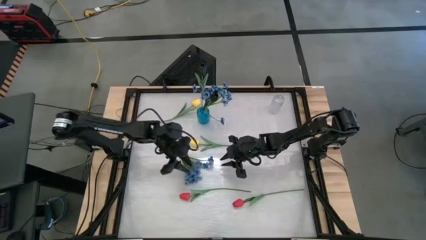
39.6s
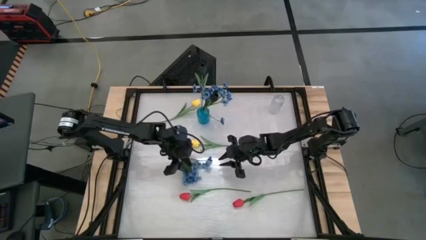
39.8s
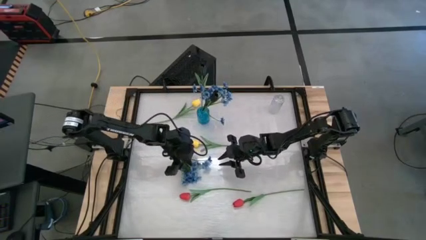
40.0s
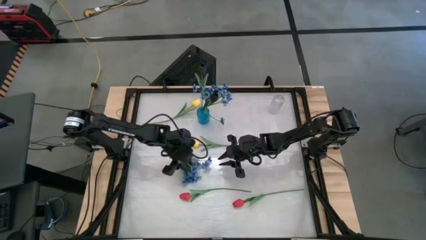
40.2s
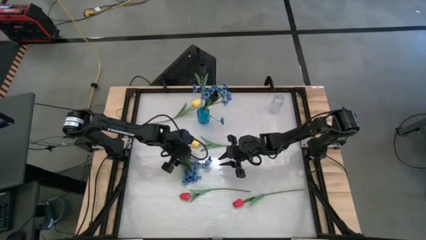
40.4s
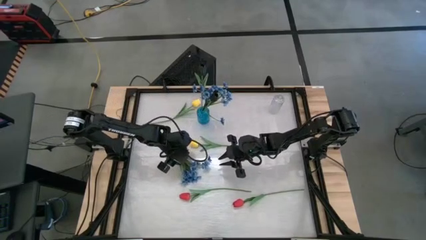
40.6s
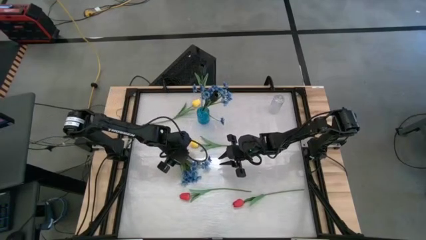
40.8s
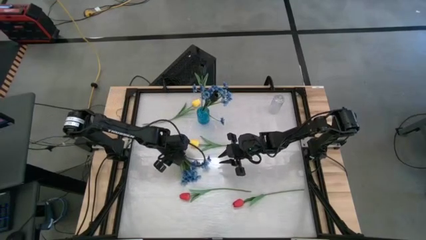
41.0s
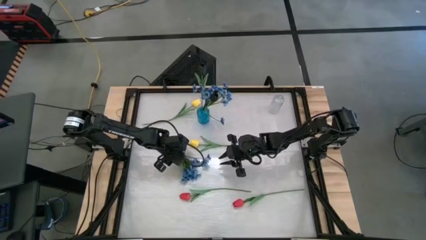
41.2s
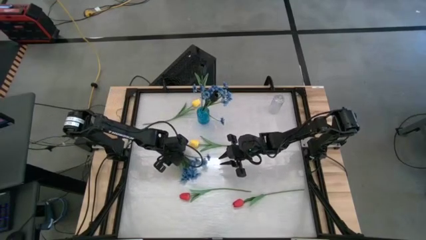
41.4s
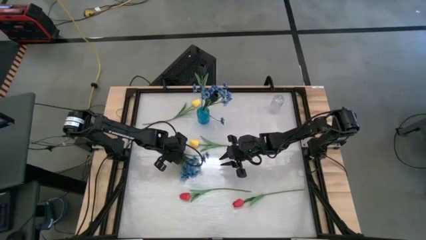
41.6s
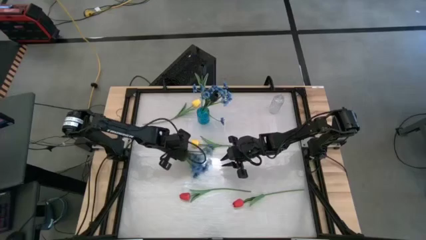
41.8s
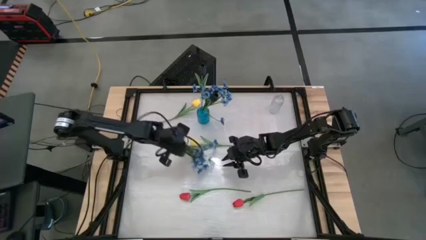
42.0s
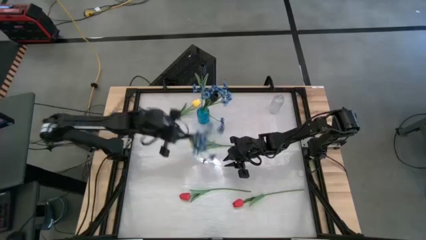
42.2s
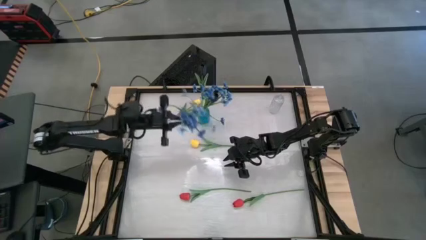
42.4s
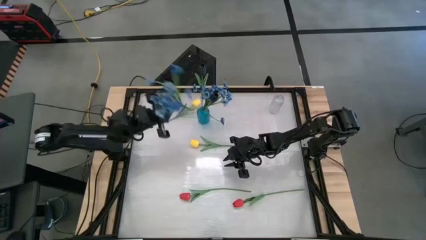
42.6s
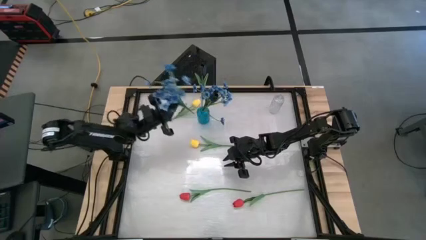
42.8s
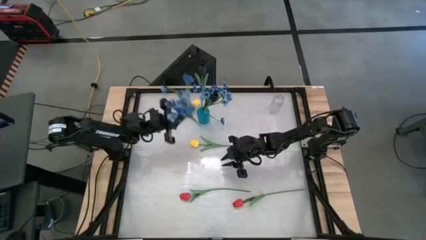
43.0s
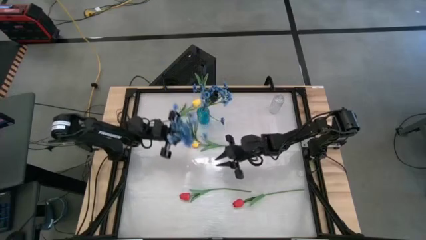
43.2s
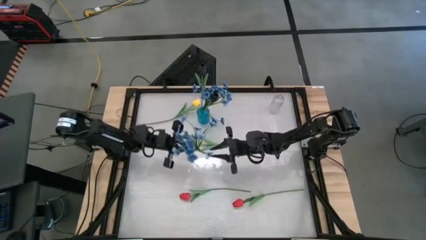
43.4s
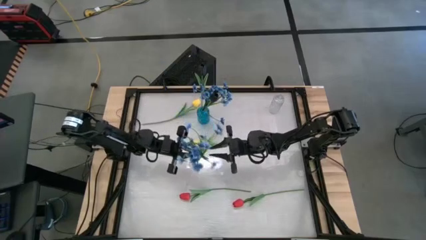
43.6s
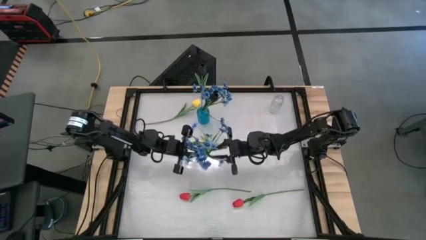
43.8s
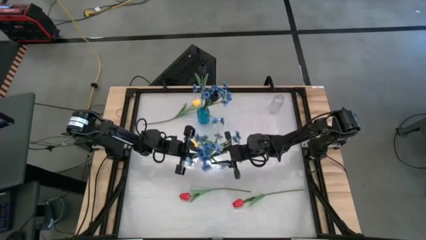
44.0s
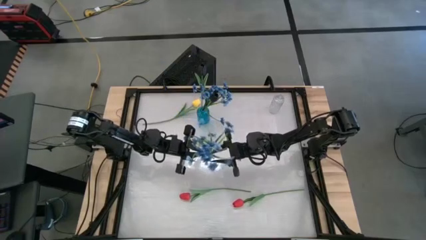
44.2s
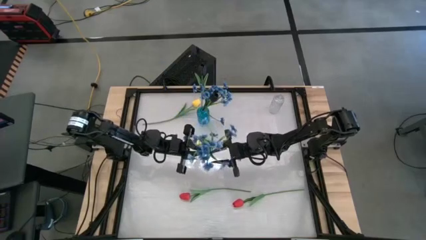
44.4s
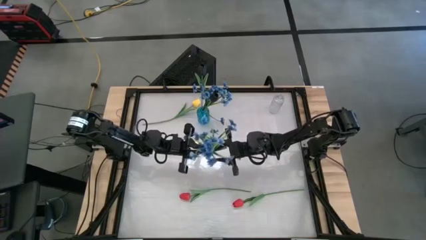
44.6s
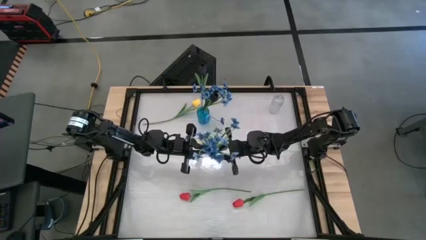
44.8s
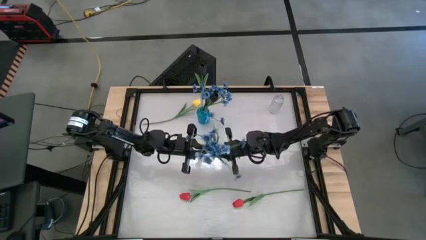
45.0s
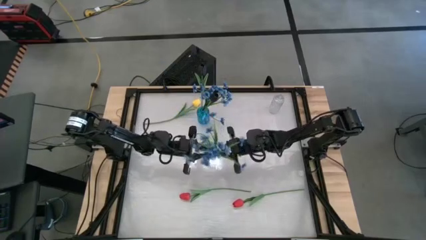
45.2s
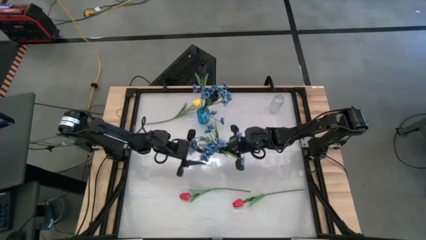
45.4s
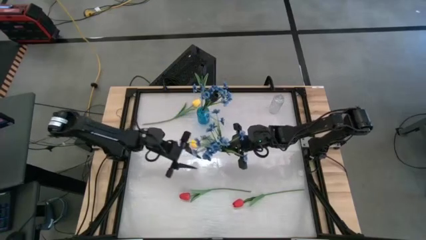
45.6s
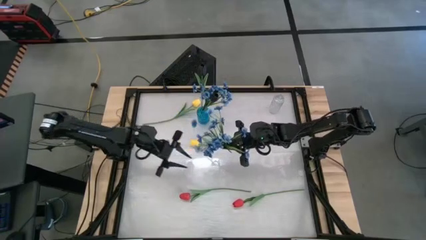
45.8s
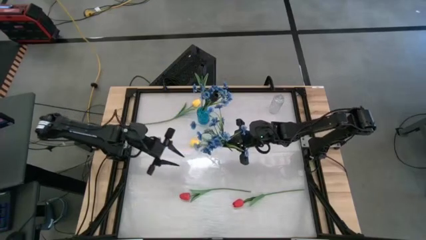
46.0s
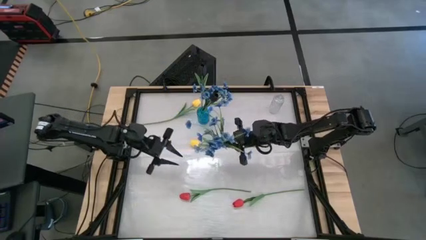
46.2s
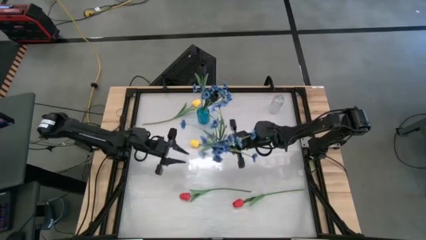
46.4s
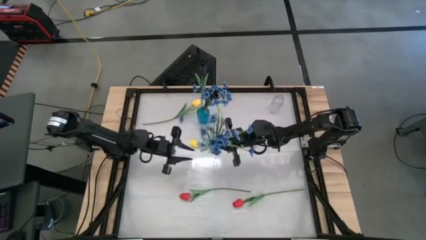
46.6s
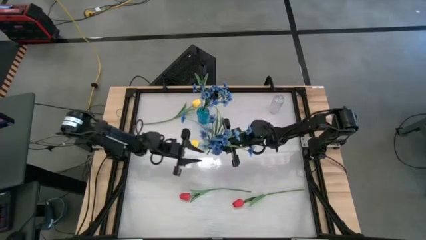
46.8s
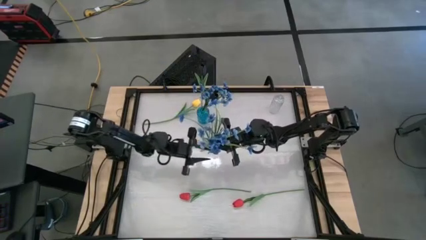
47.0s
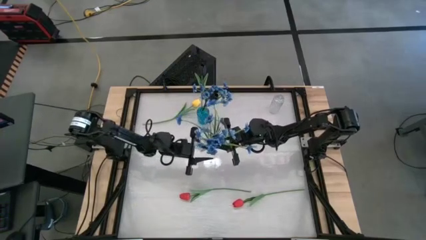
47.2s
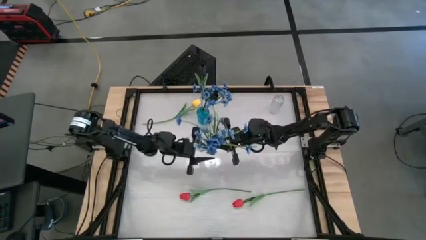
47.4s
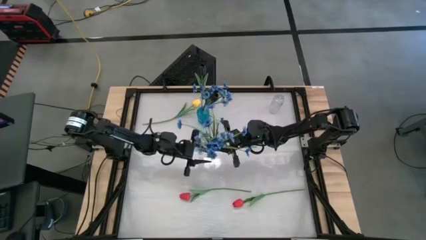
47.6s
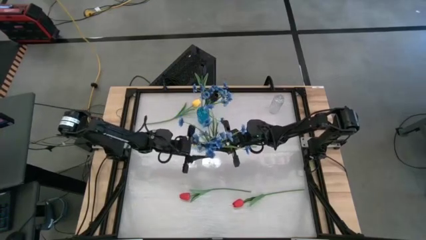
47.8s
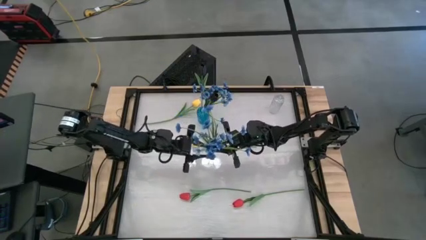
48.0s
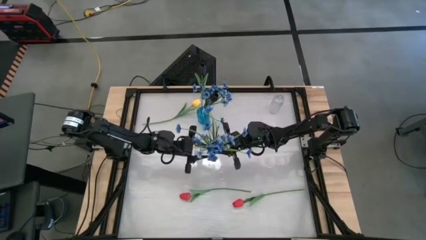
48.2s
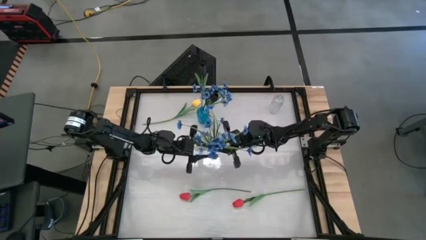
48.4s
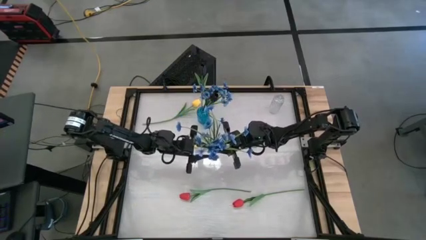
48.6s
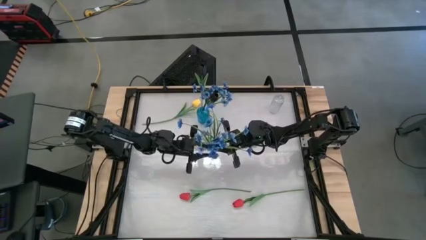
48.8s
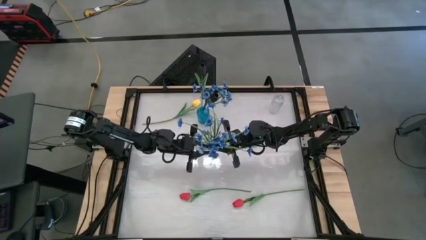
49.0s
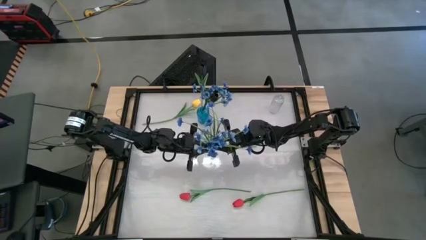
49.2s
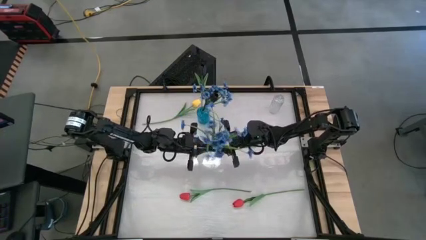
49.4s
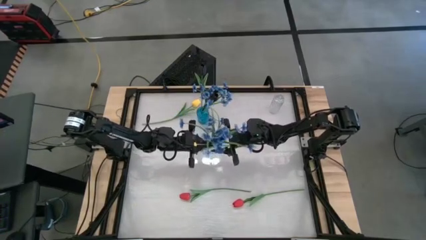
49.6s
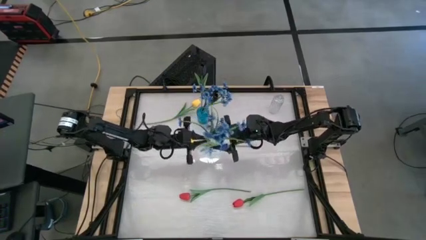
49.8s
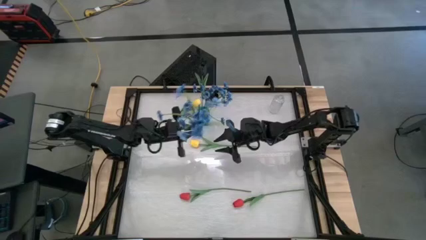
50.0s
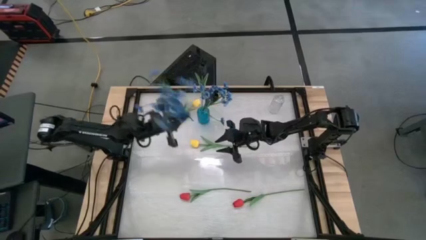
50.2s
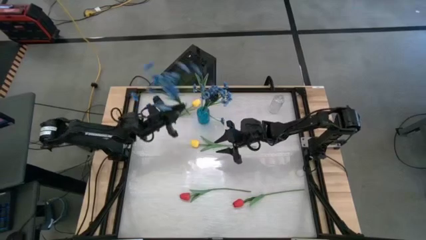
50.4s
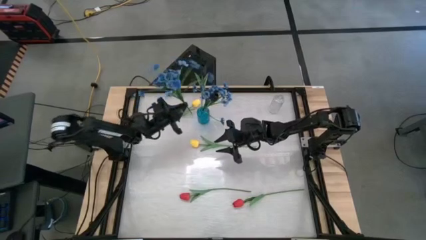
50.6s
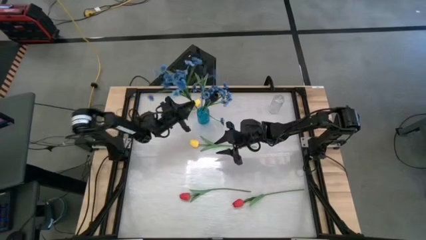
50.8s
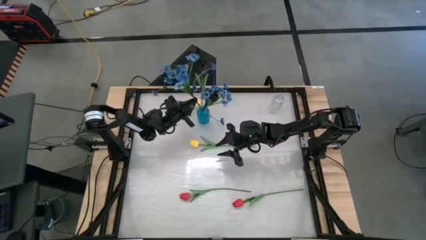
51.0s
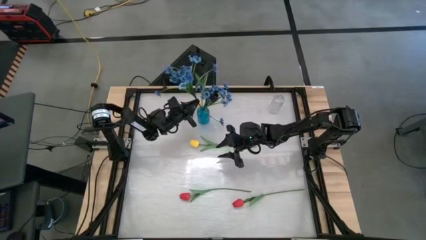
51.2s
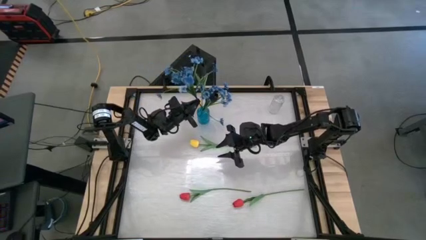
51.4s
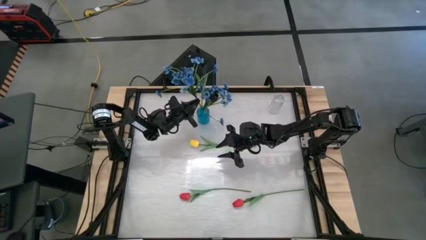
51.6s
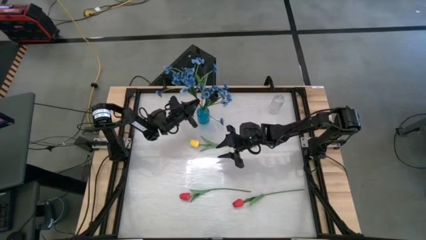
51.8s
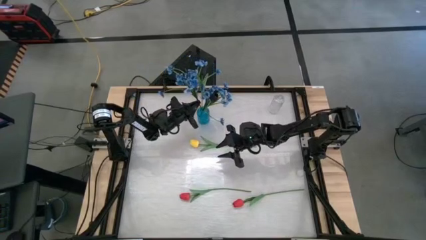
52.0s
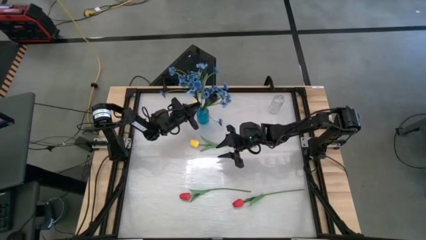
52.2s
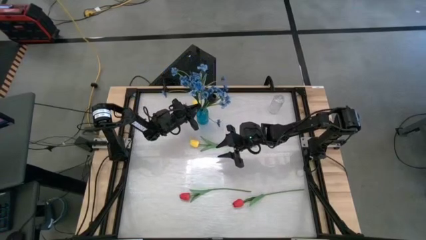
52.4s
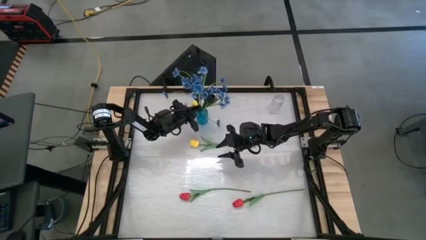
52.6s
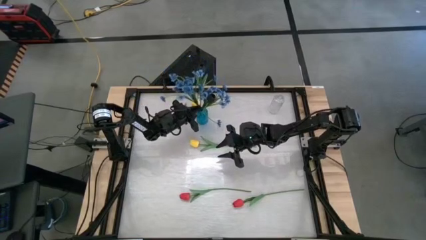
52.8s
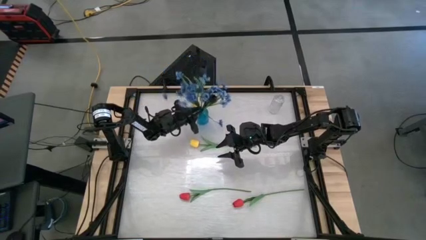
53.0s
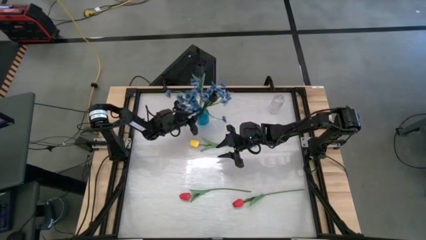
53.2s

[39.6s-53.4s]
Task: Sort flowers into vase by color
Put the blue flowers into the blue vase

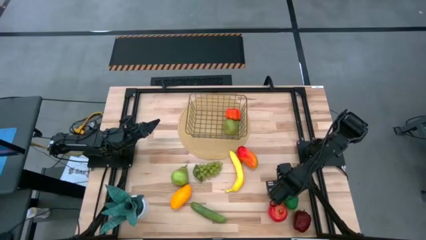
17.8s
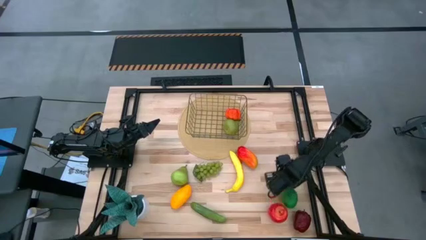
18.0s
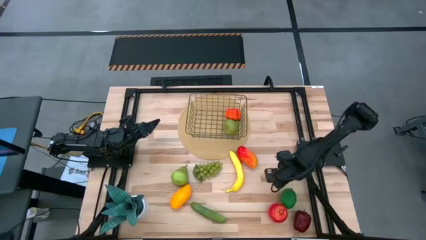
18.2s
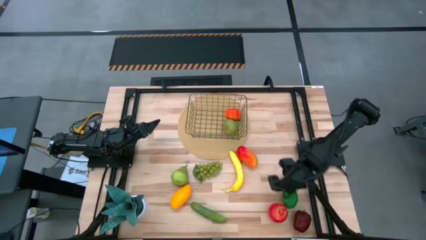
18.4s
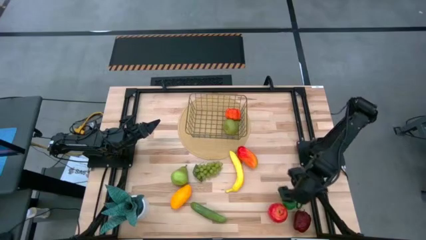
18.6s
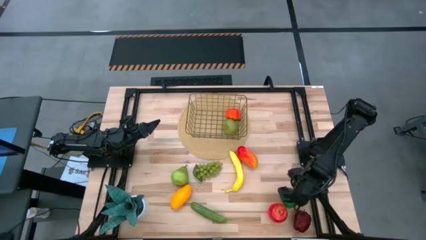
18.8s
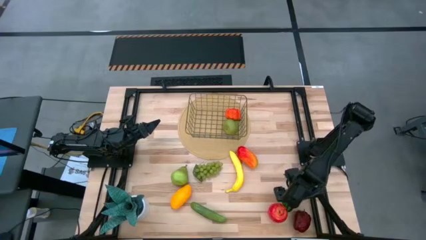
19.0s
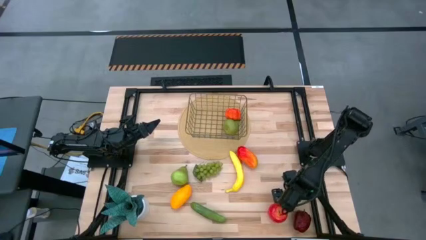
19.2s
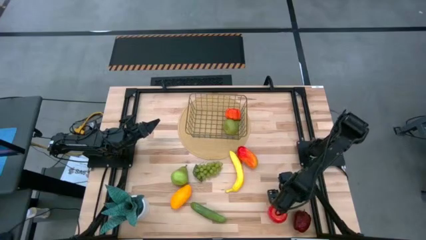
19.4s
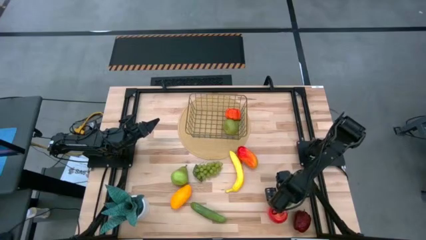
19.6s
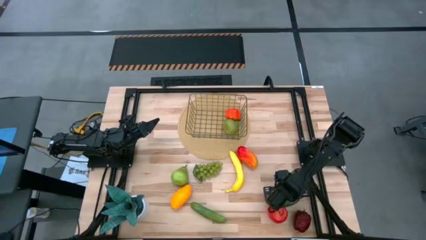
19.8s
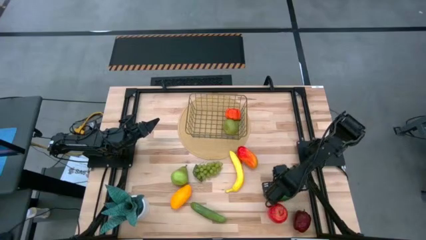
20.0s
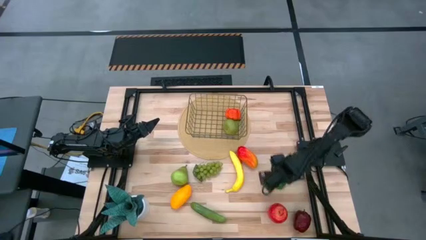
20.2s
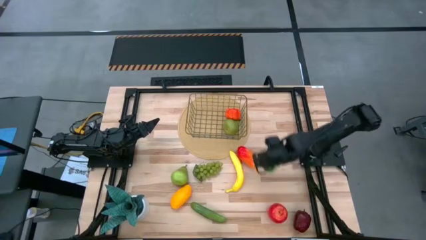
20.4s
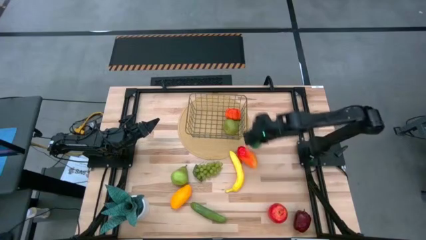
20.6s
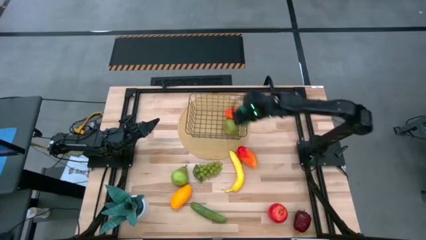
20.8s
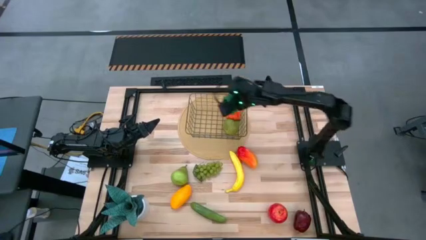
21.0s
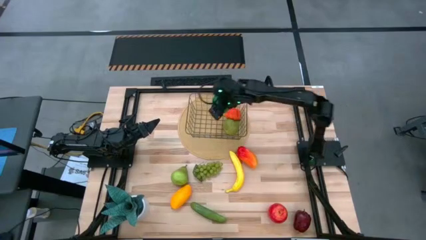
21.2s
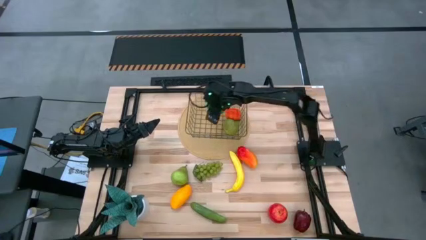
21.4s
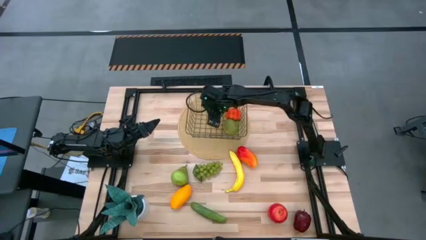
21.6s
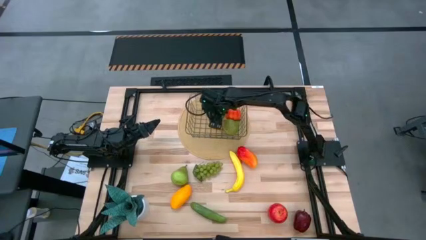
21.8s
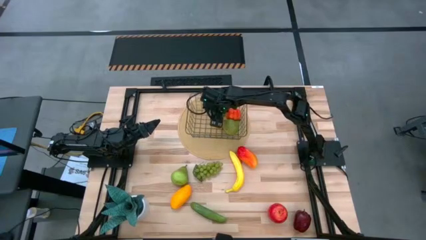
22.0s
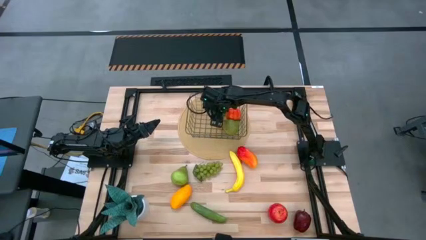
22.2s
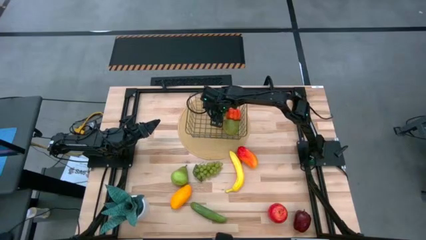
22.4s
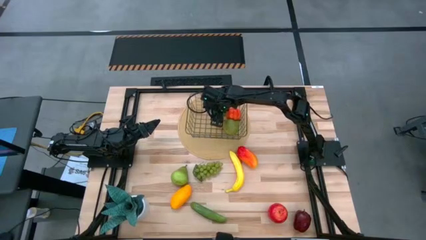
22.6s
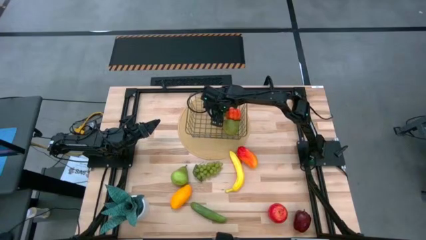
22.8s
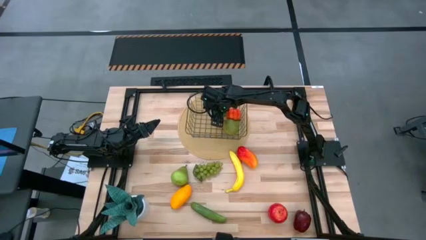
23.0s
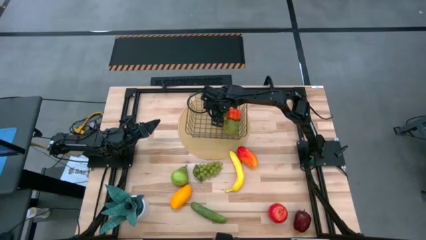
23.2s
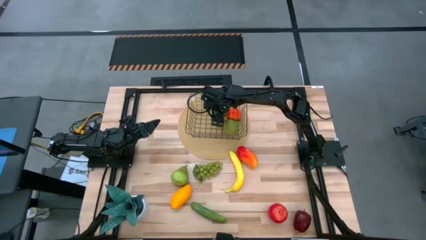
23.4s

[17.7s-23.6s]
Task: Build produce basket
Put the green lime into the wire basket
